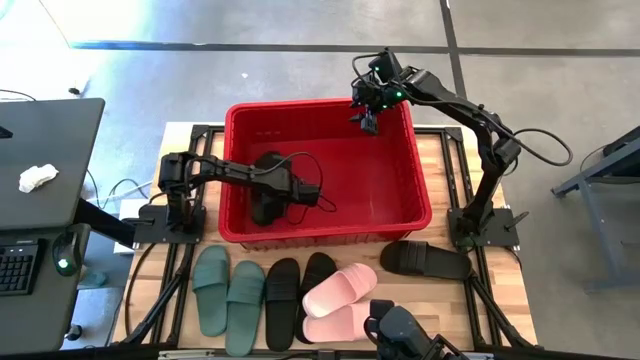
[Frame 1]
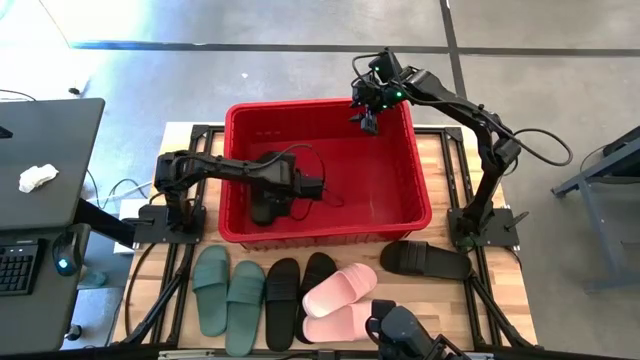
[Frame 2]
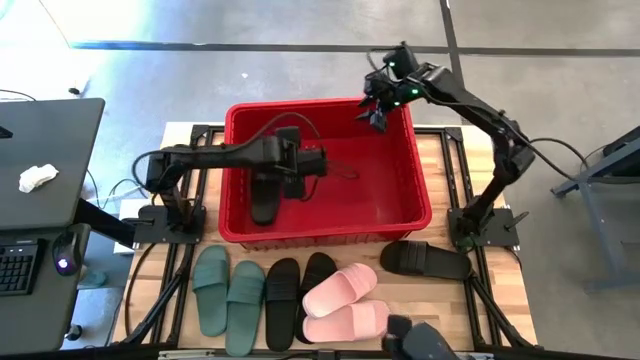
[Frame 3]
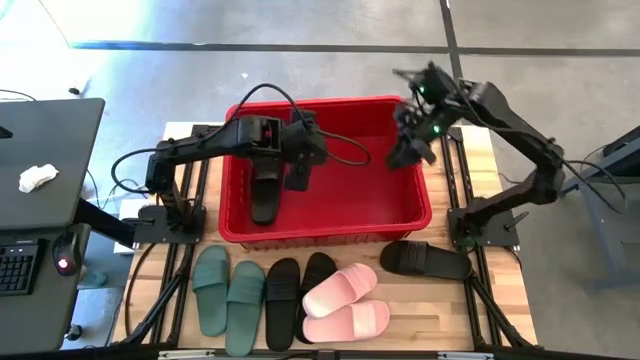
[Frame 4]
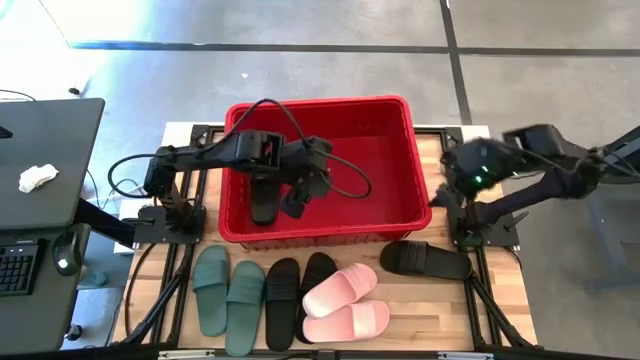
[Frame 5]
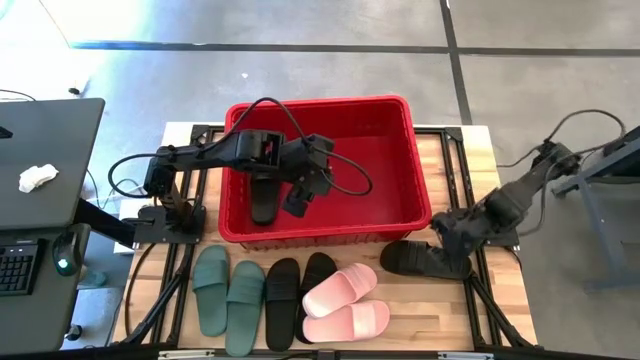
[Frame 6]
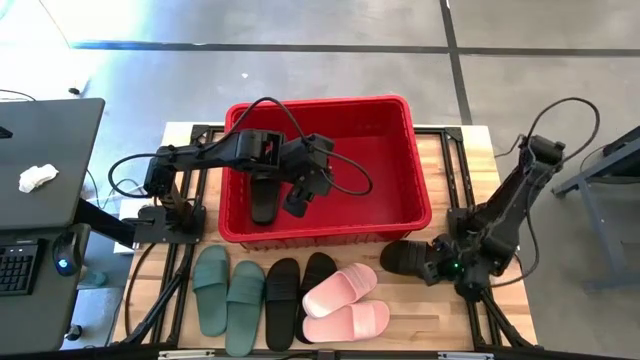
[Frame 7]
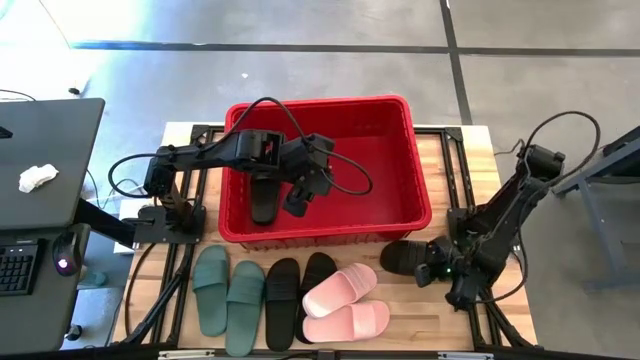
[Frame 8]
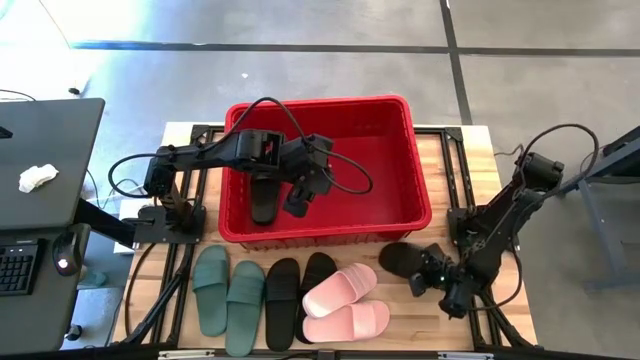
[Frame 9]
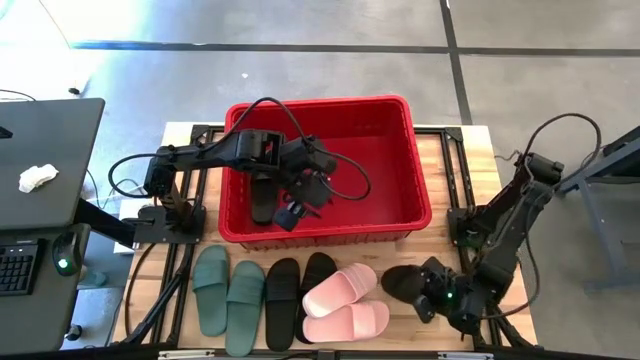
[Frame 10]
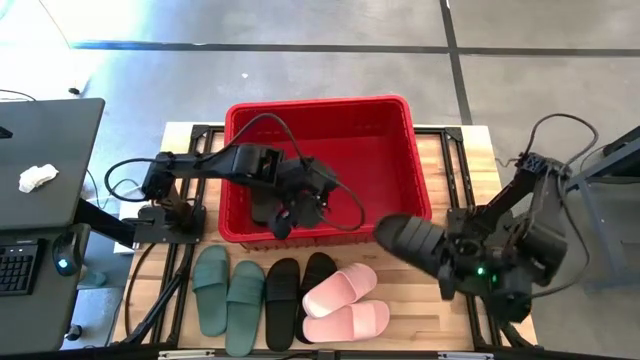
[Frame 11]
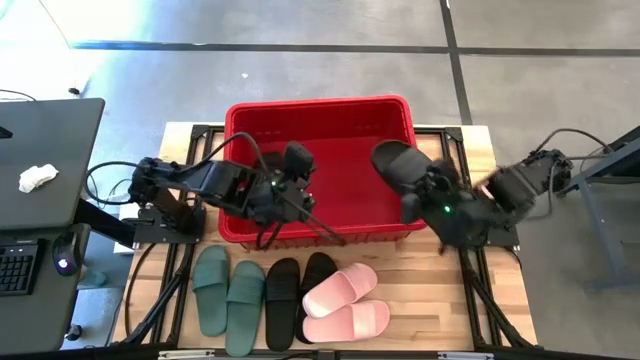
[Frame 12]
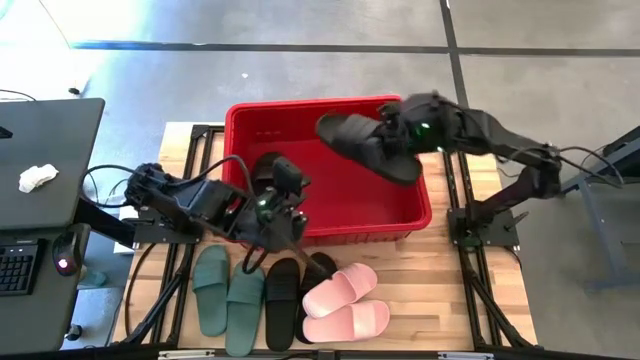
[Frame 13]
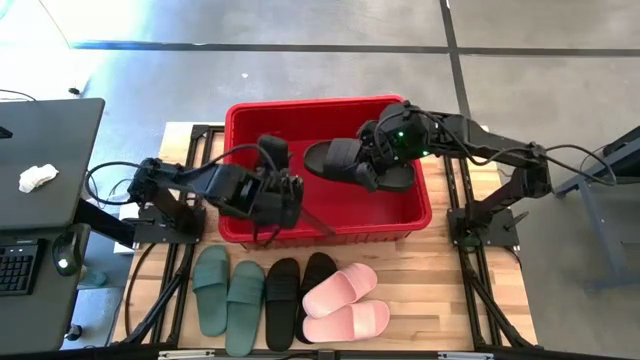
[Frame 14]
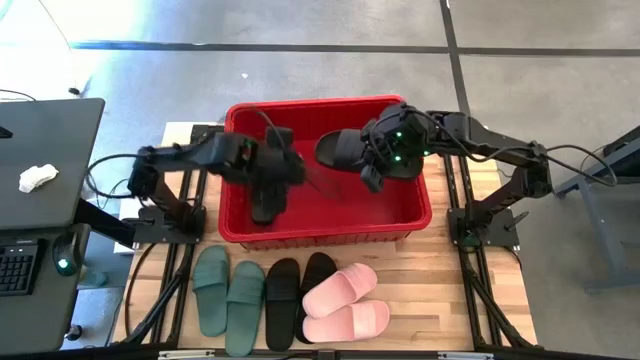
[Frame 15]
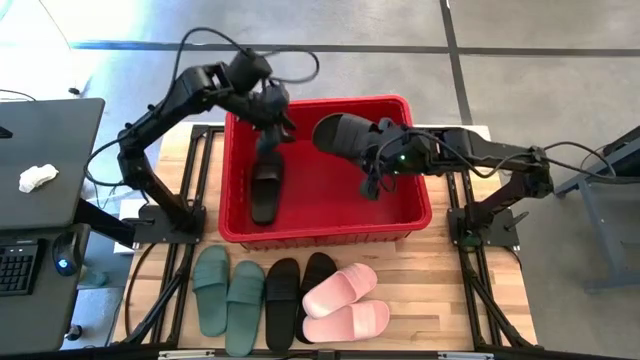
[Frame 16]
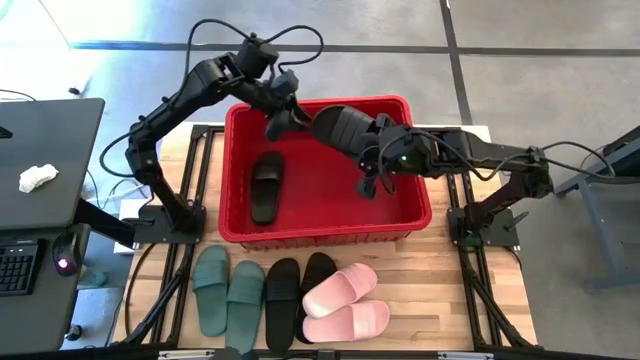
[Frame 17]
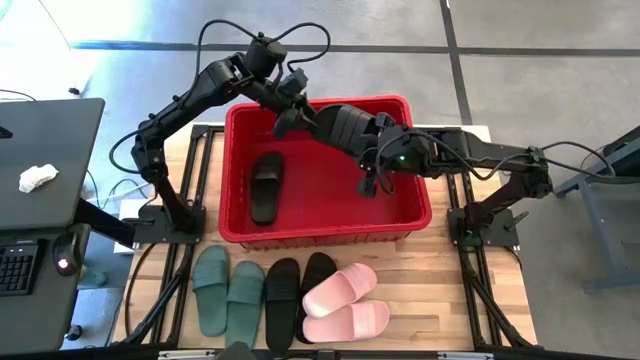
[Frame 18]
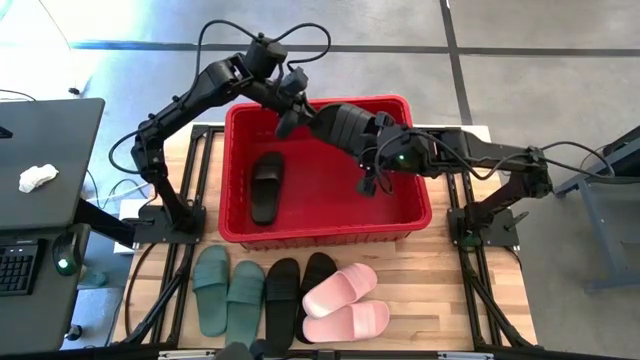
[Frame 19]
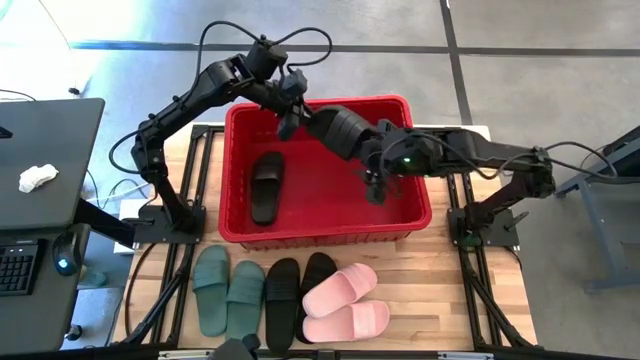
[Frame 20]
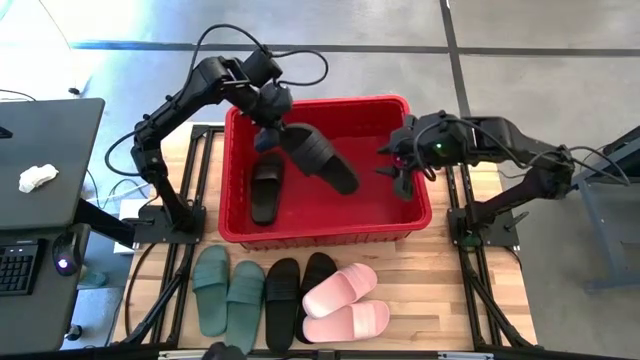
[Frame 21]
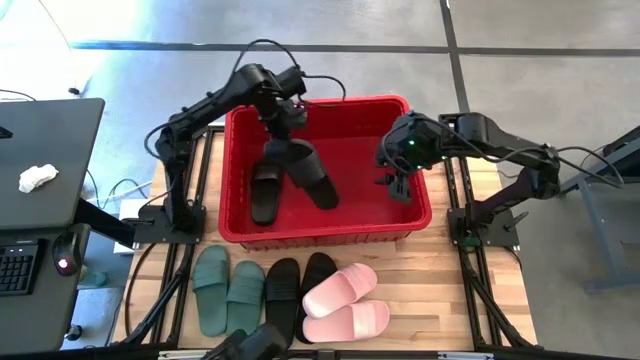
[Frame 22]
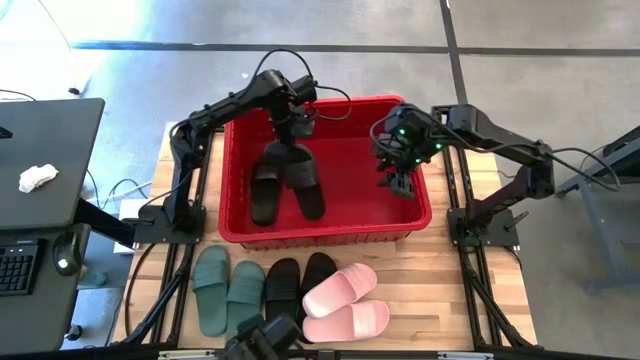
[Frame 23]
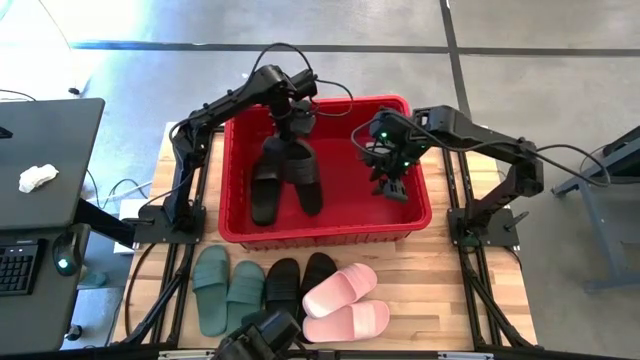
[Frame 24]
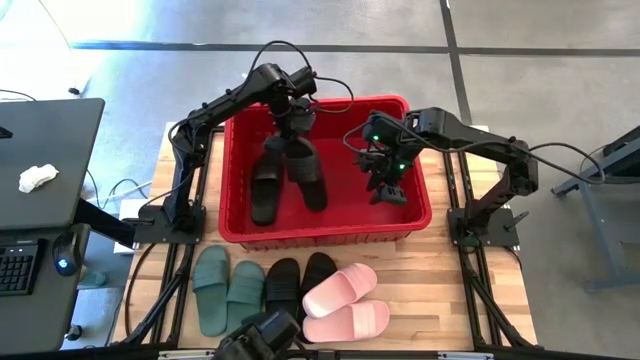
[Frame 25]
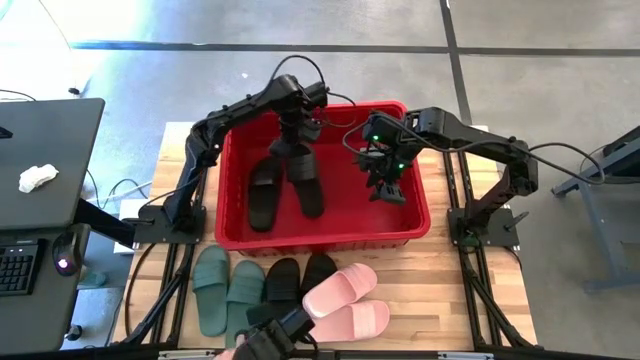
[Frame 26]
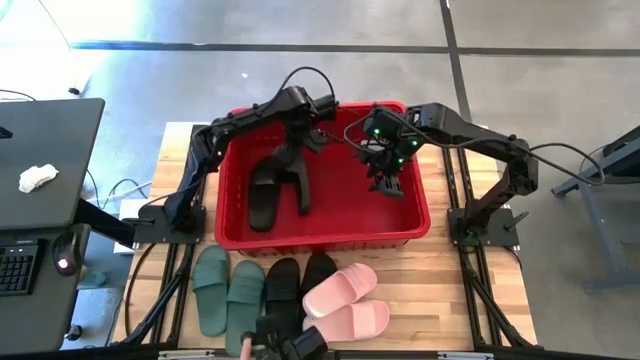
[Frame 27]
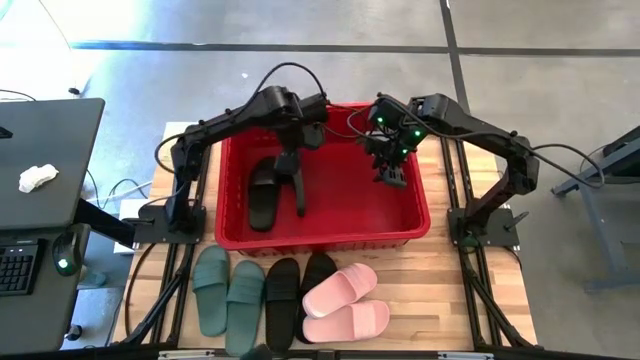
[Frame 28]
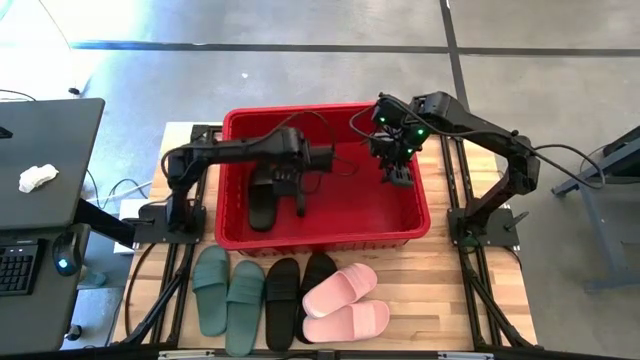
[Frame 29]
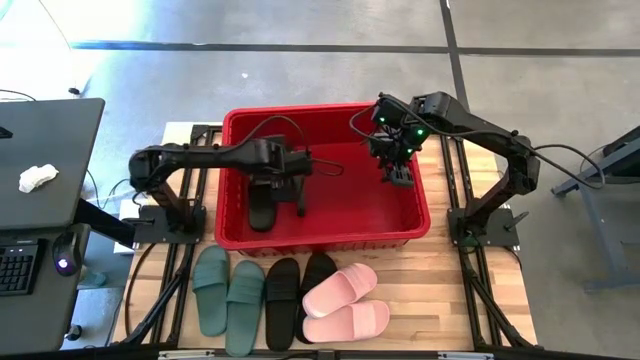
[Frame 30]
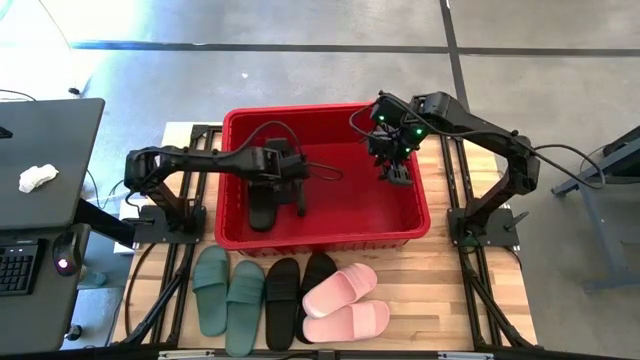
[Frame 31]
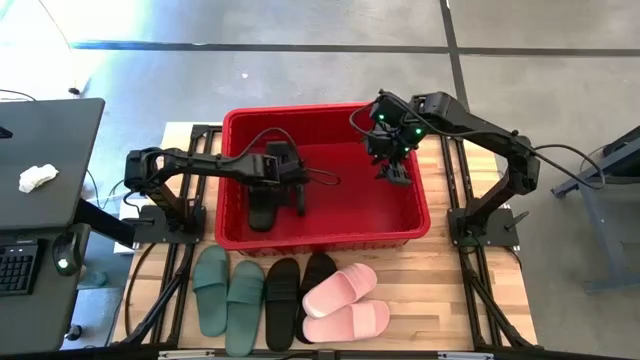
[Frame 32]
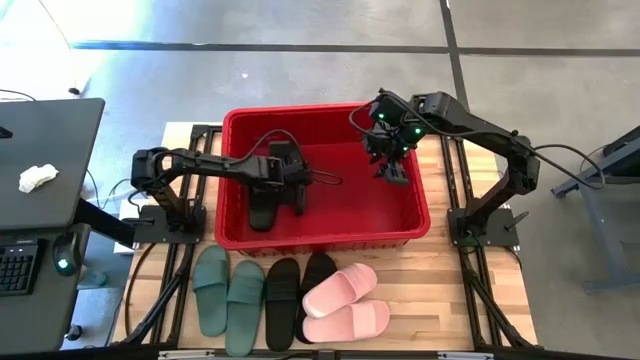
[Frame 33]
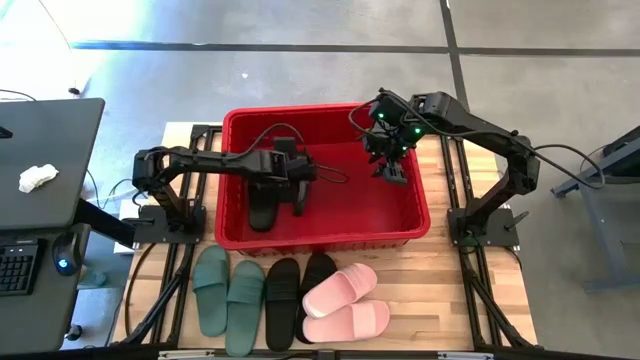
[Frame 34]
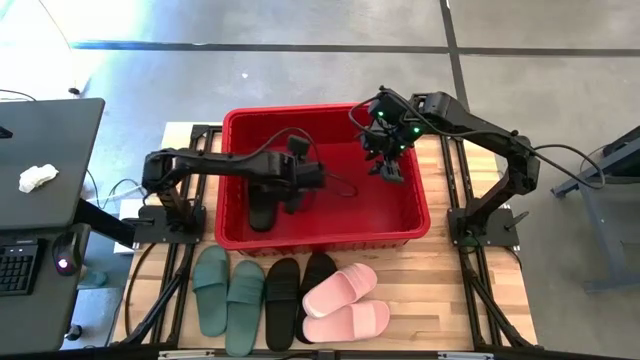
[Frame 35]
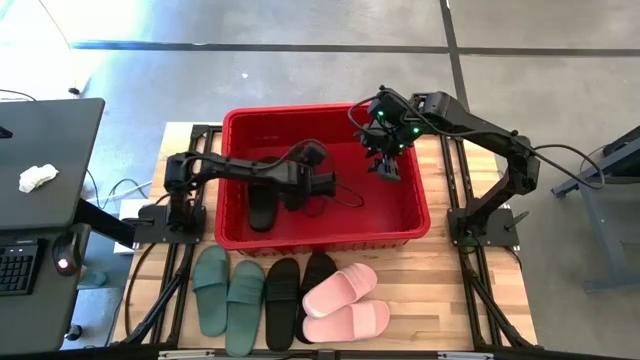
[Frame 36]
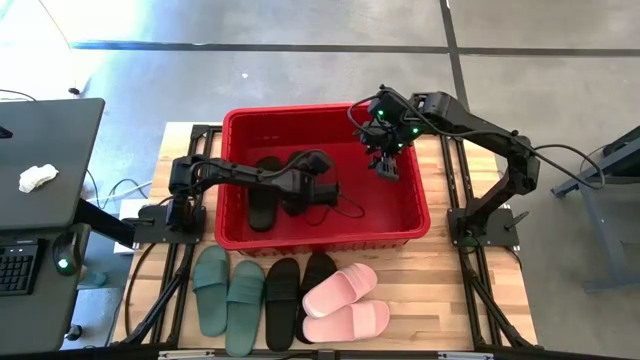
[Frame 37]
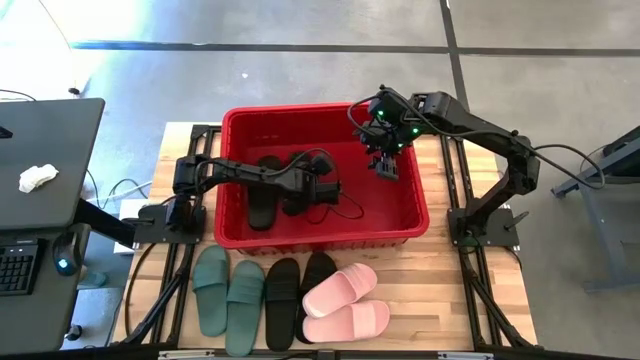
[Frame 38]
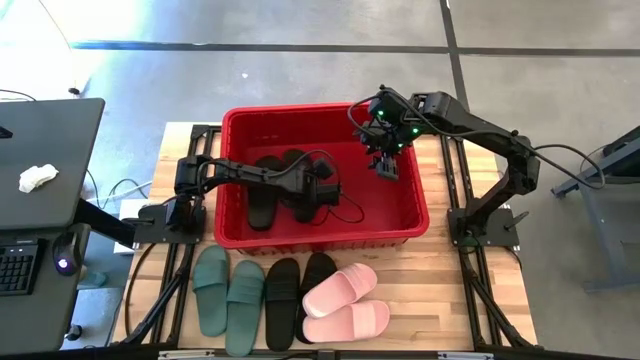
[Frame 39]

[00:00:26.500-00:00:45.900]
Task: Pick and place slides into bin
Put the black slipper into the red bin

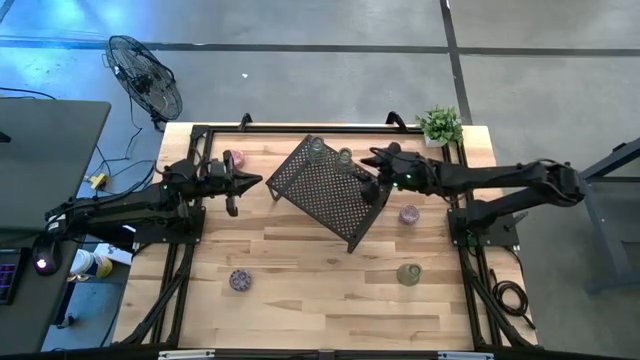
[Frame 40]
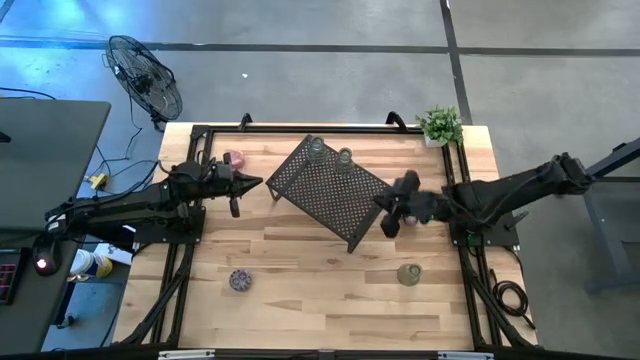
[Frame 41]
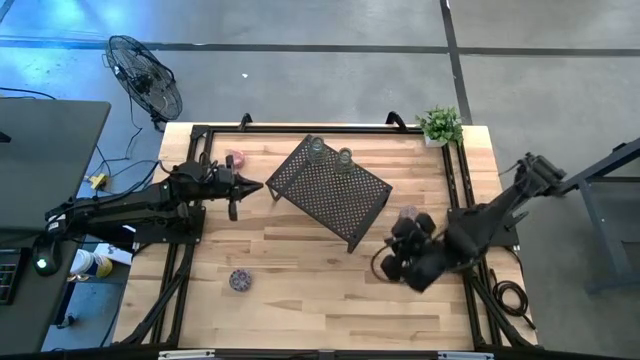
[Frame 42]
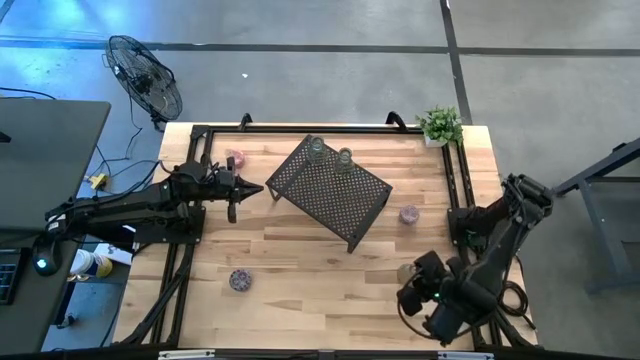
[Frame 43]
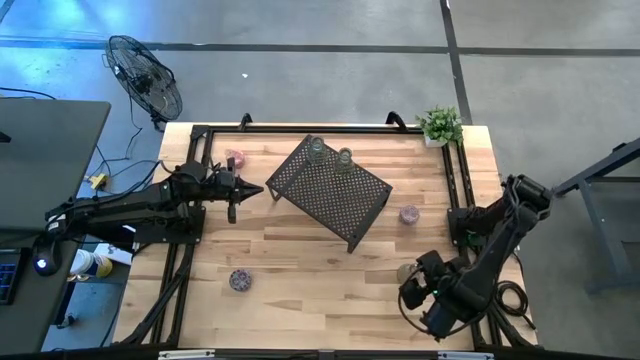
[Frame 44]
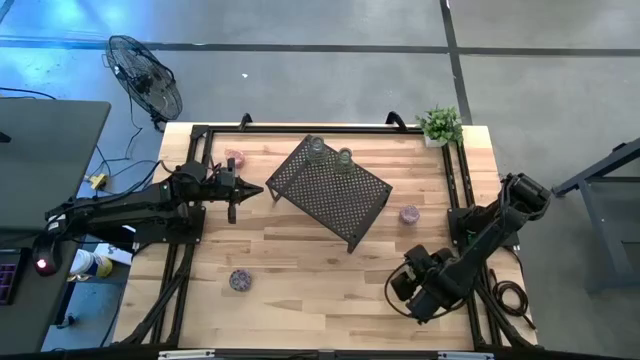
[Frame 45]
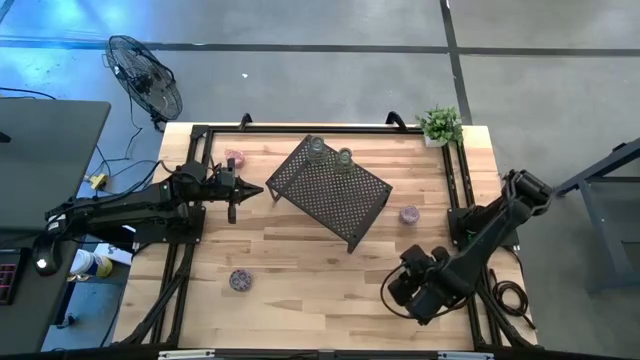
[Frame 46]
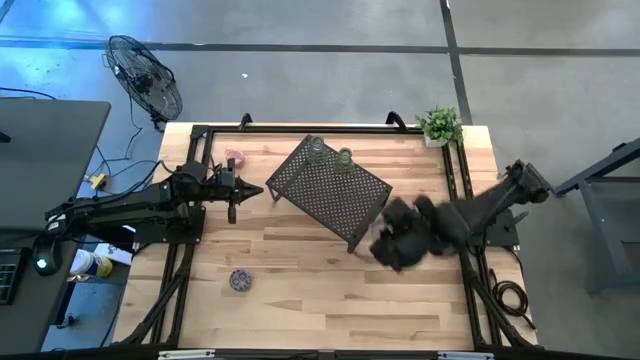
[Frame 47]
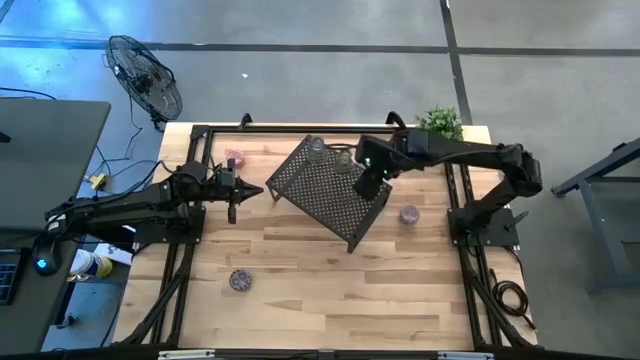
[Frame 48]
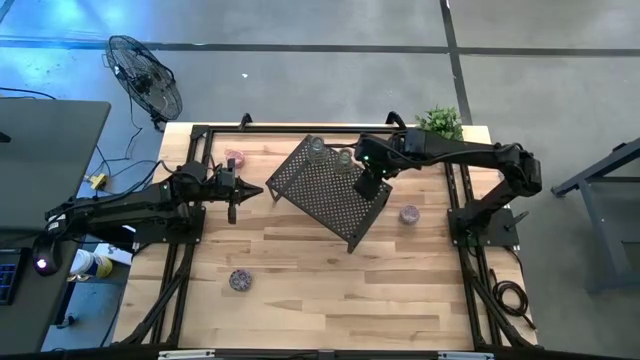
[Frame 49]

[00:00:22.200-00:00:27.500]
Task: Pick & Place candle stick holders
Put the green candle holder on the shelf
